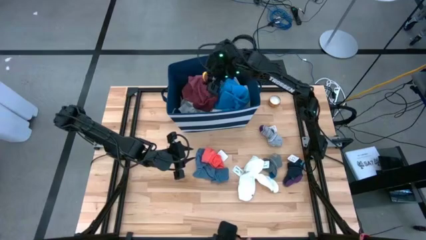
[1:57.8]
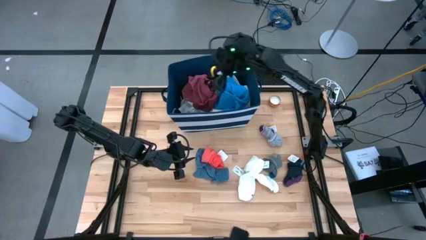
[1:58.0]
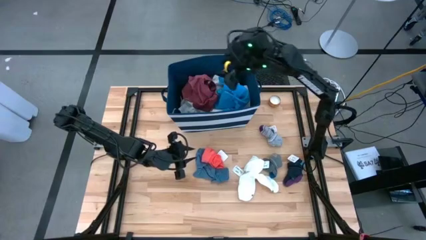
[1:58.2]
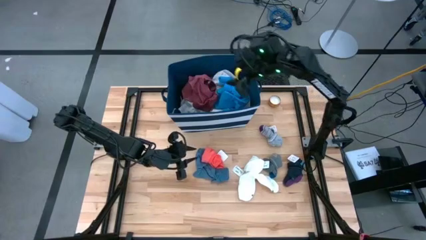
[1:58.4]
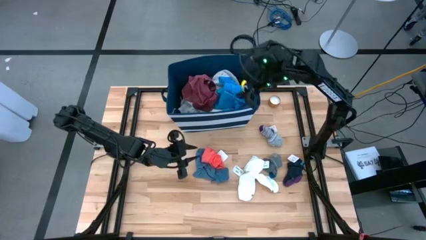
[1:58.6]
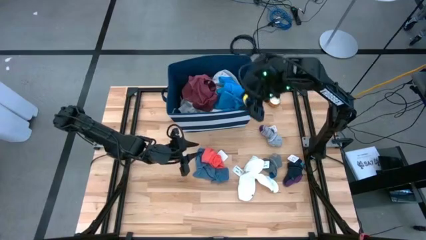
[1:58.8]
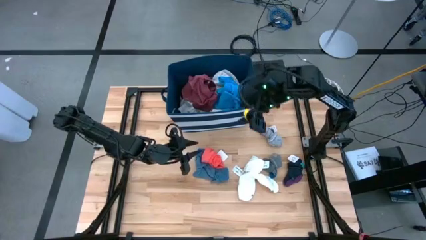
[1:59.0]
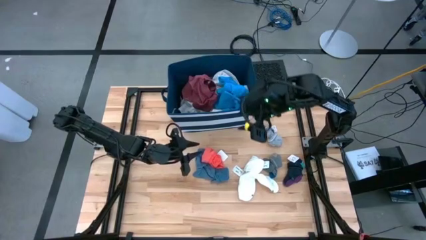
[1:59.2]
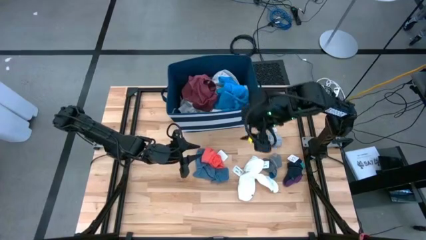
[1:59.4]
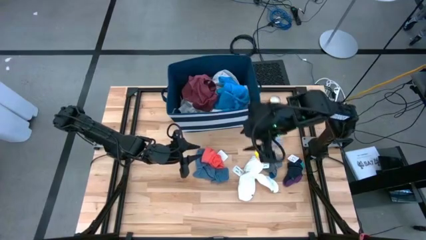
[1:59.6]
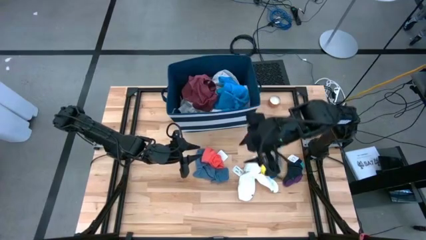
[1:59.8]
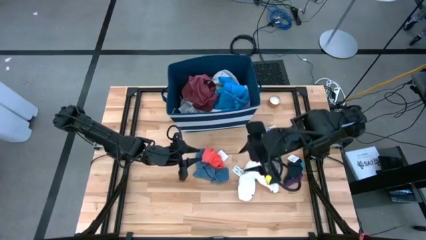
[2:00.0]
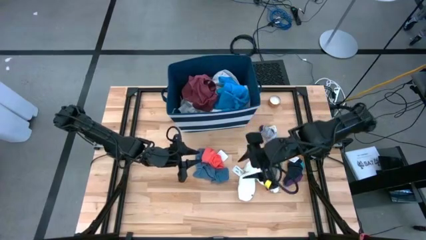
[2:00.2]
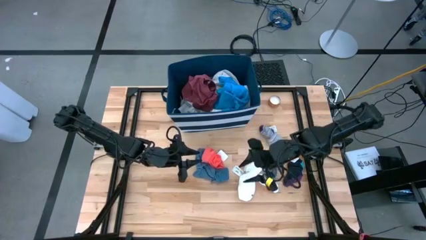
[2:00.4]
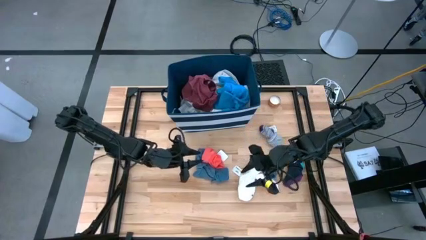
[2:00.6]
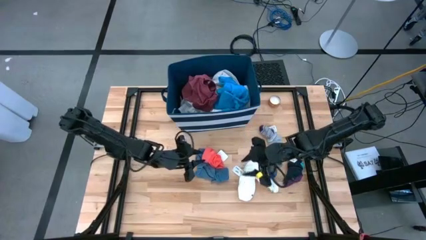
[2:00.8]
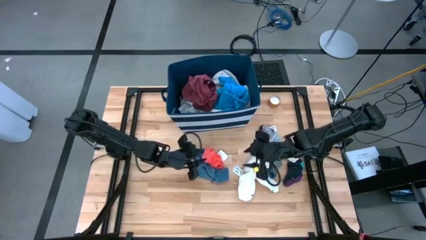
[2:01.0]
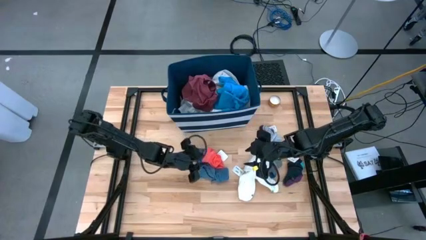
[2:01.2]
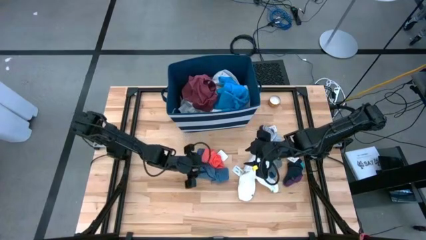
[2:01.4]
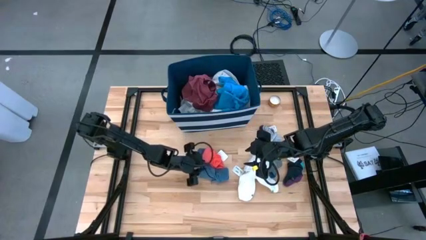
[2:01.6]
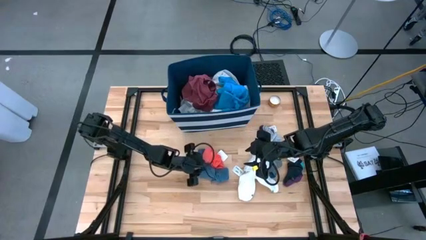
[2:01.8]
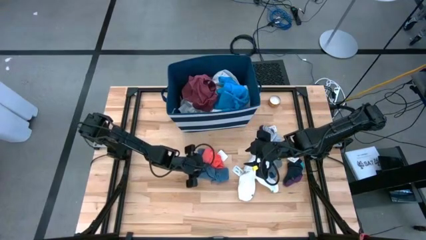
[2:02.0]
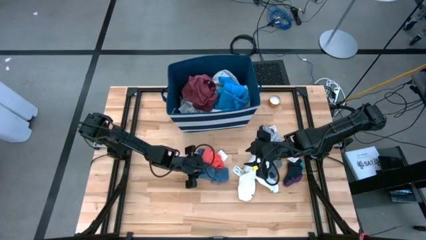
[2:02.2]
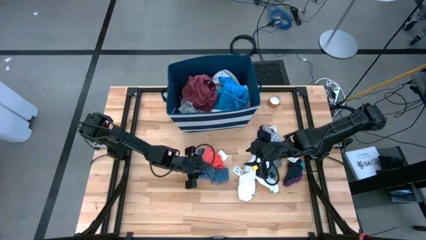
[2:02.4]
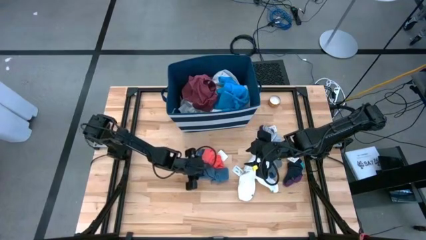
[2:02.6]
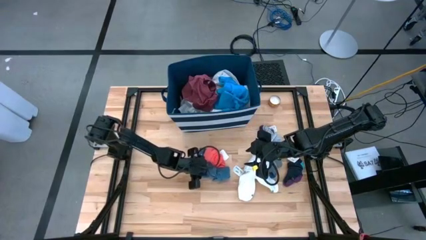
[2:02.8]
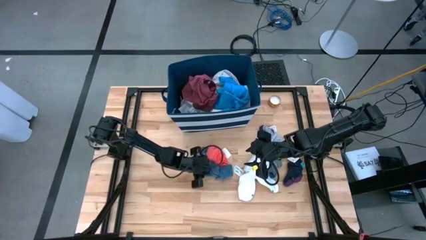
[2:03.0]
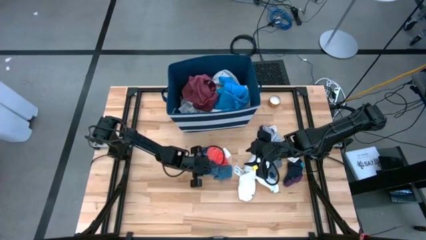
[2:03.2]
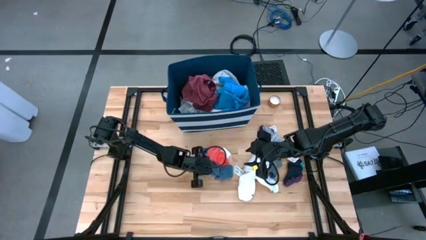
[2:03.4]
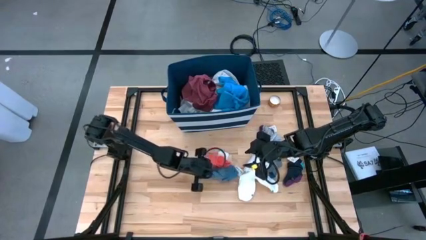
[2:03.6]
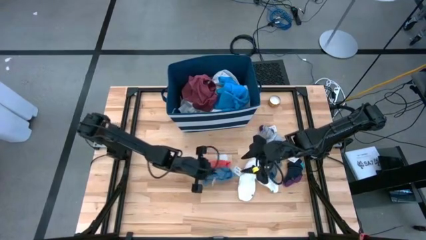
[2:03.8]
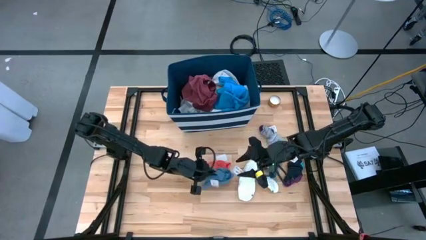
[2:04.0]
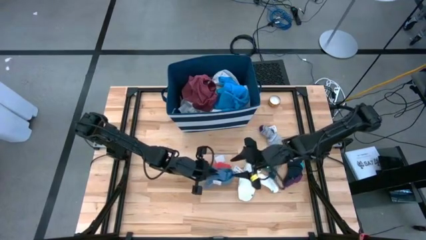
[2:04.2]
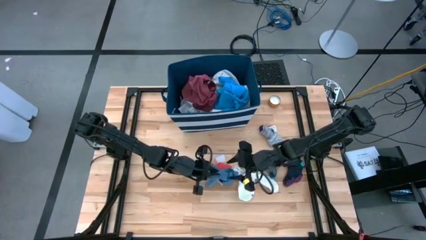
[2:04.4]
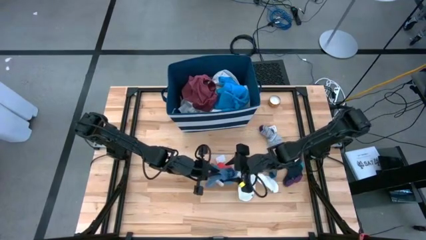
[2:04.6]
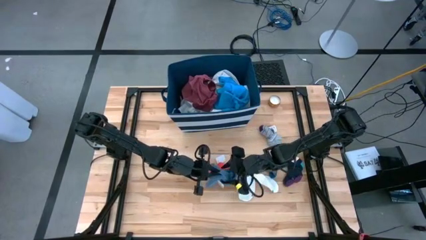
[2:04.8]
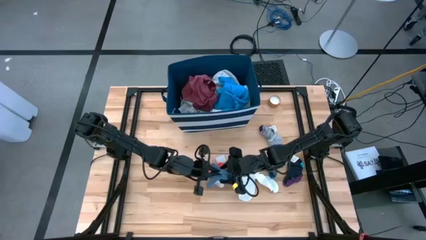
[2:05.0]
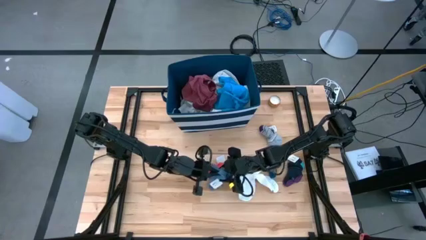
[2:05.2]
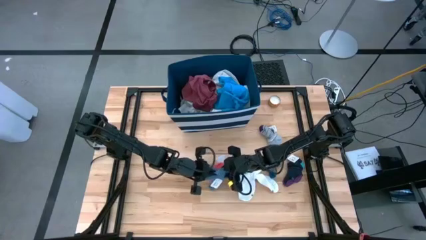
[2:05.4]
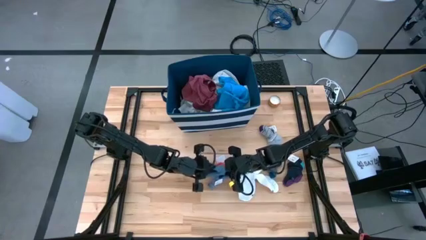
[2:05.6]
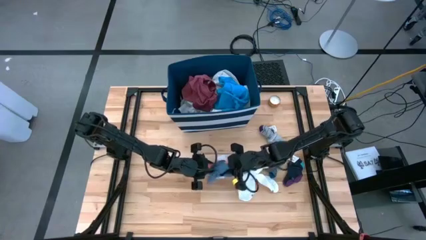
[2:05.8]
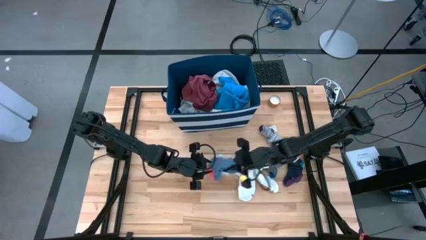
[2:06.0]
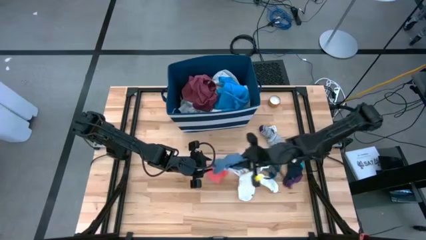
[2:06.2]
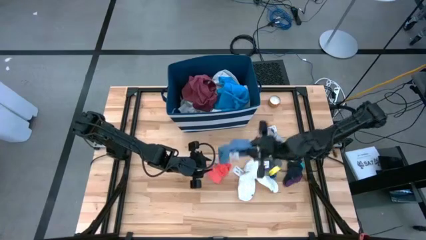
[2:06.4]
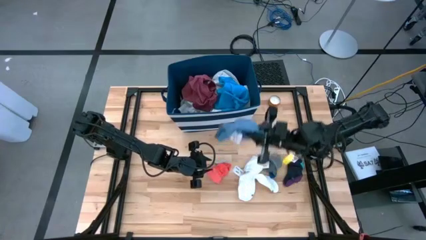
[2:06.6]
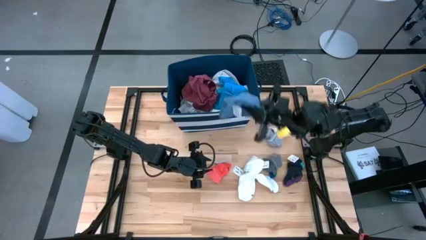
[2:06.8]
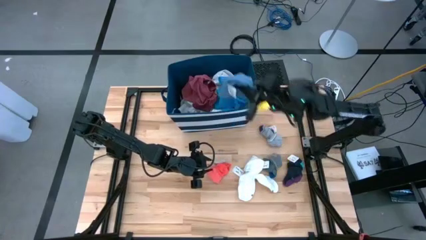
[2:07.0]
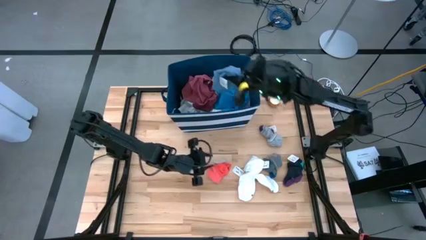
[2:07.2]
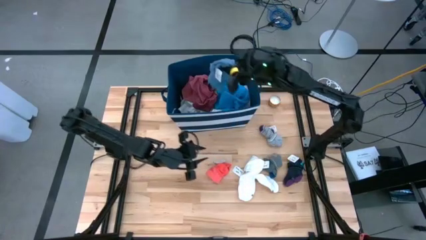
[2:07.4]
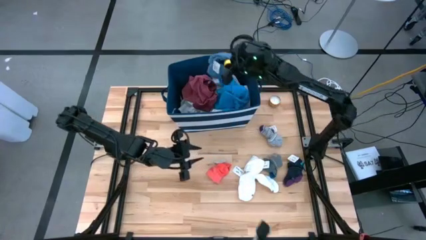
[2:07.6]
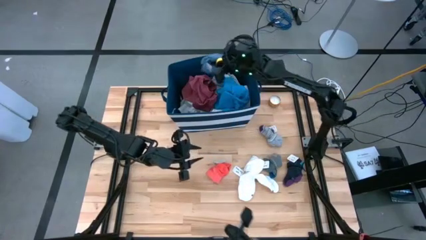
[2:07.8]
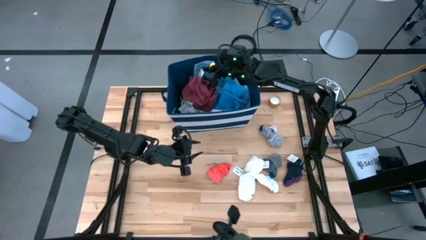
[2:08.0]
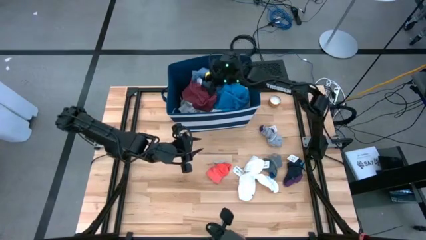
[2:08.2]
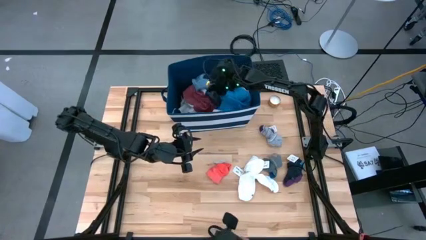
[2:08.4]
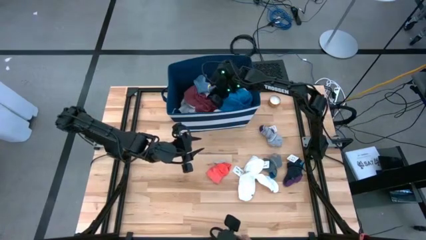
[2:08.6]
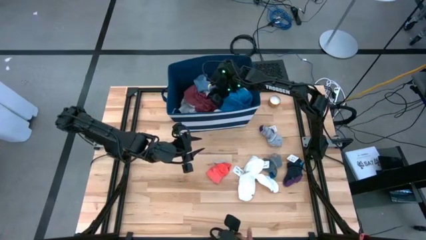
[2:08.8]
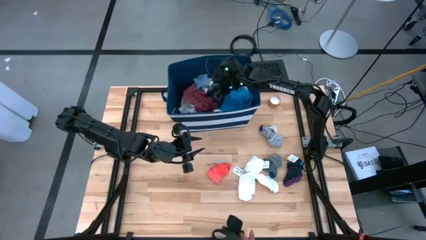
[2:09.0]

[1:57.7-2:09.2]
Task: Sort clothes
Put the blue socks into the blue laundry organizer

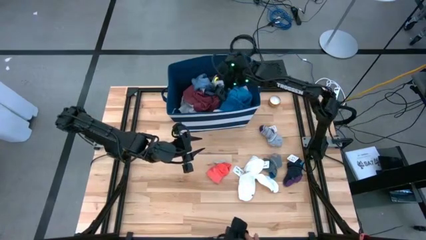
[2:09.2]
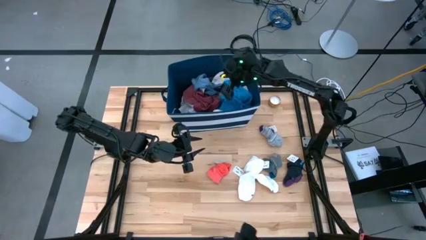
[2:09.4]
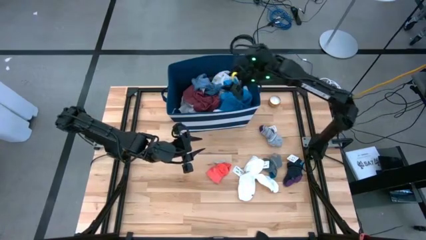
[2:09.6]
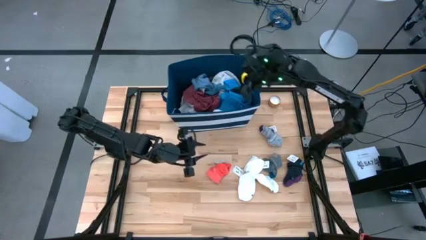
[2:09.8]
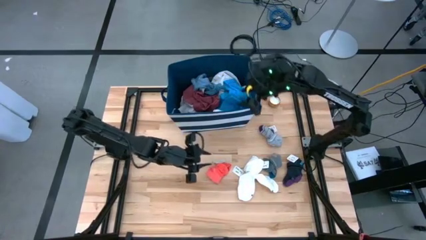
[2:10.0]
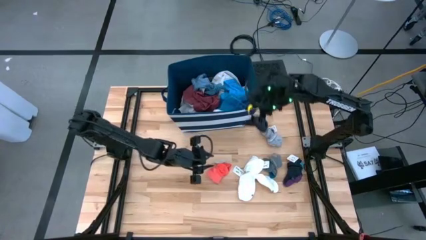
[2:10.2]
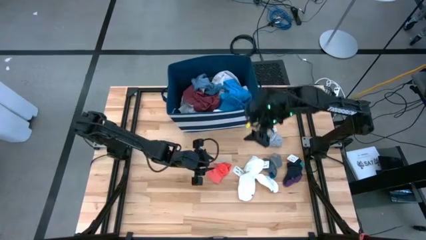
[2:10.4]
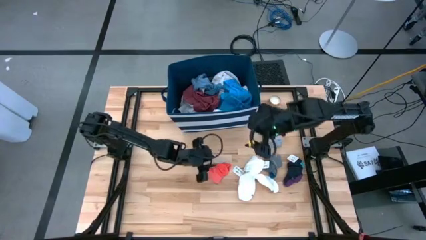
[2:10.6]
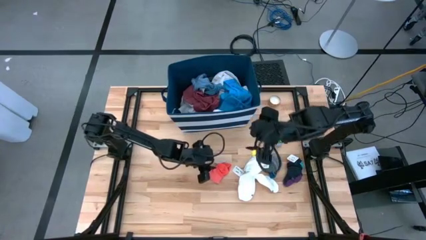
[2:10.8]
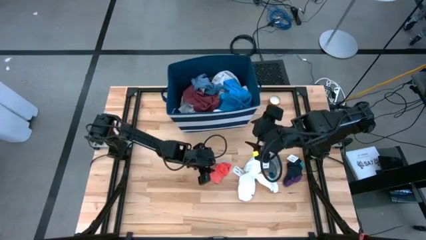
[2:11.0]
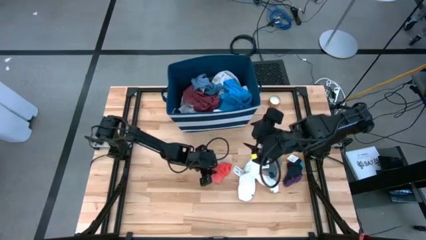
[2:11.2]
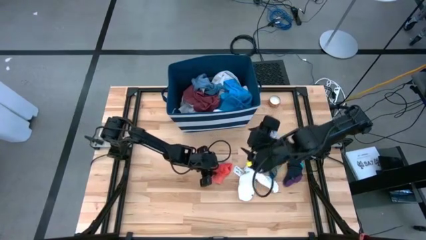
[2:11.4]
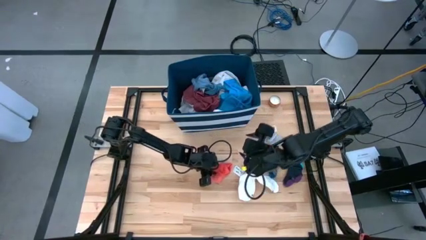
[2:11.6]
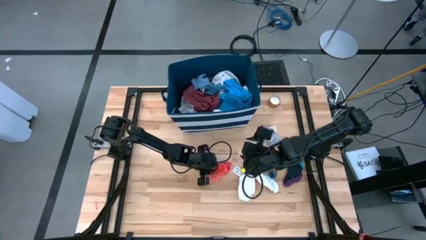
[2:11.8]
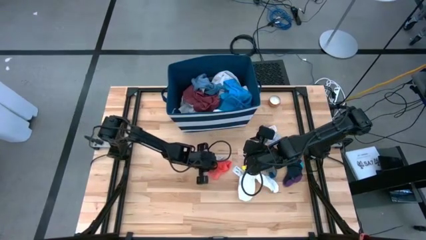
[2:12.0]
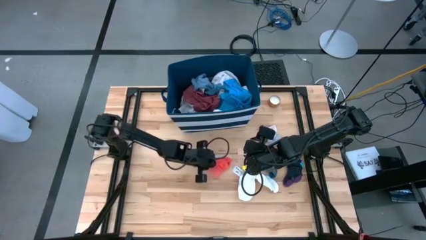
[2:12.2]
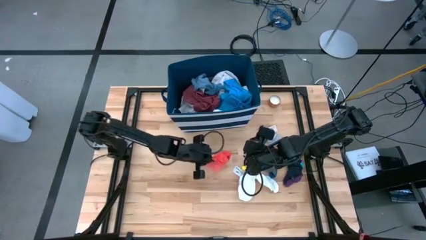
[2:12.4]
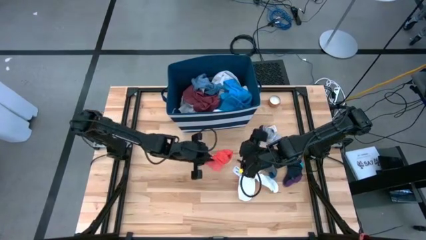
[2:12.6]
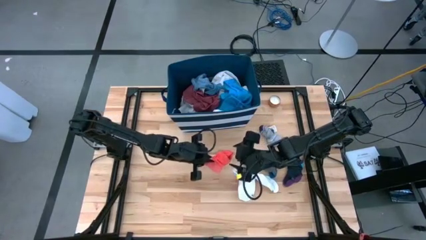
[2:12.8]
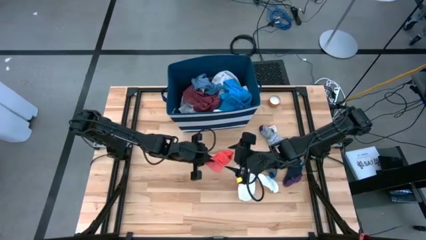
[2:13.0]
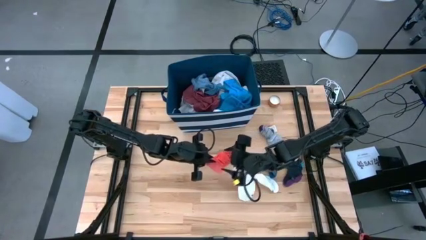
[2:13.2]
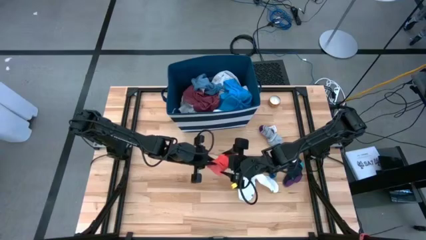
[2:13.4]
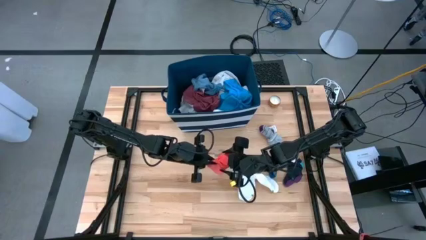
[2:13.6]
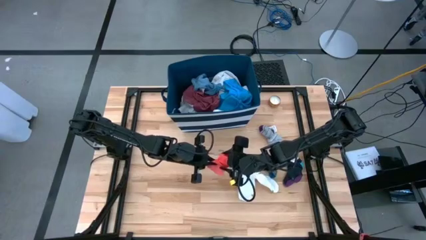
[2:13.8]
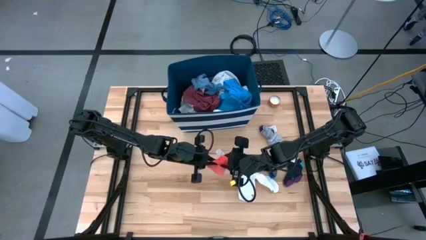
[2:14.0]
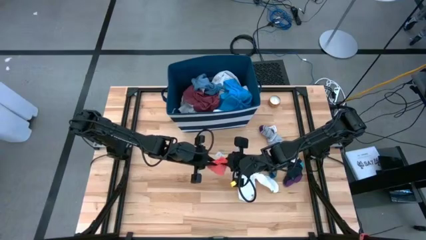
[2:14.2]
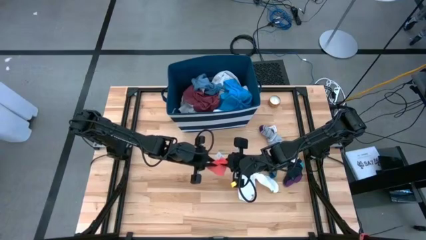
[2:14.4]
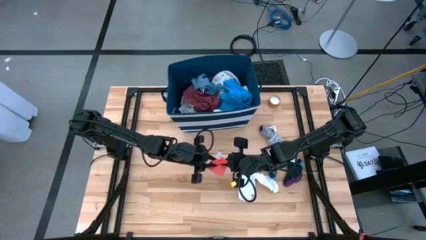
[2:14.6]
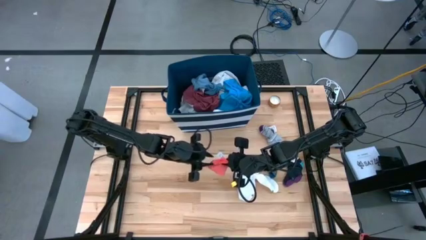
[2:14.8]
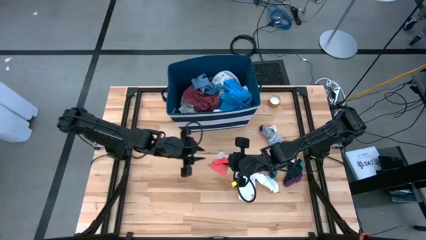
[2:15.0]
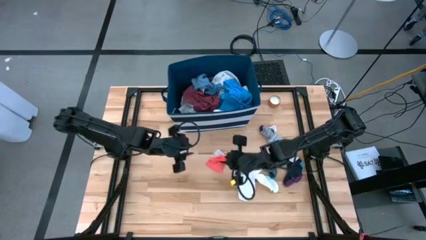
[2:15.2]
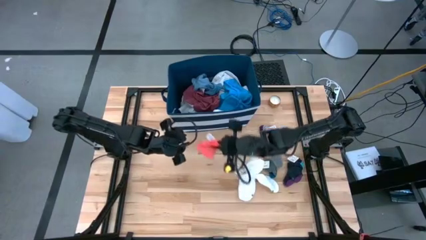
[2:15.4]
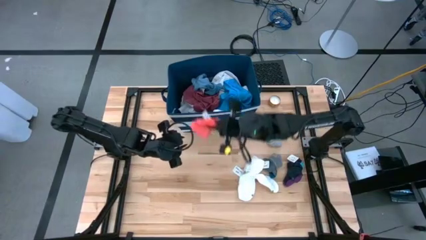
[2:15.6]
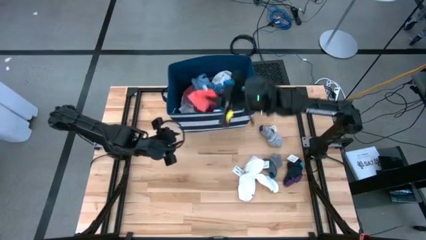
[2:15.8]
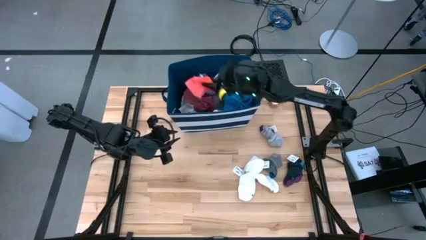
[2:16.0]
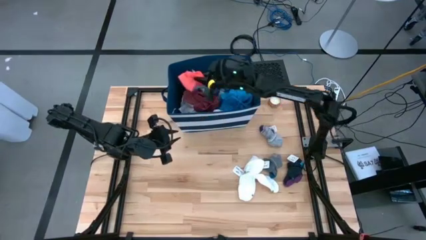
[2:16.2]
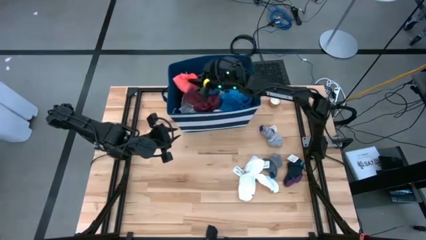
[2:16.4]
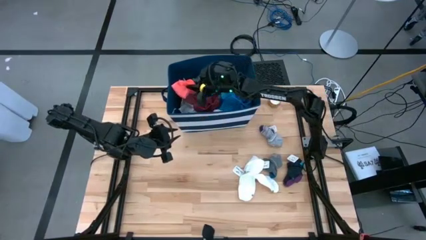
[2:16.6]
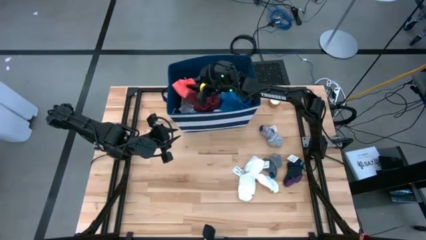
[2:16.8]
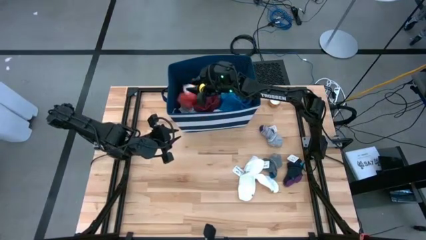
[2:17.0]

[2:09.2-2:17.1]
Put the orange socks into the blue laundry organizer
